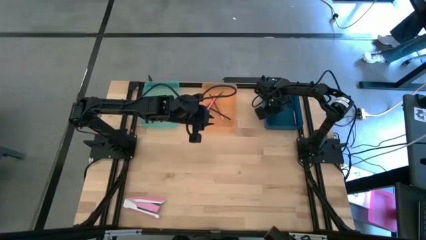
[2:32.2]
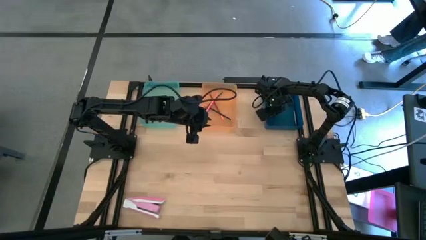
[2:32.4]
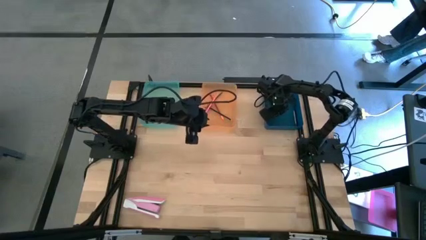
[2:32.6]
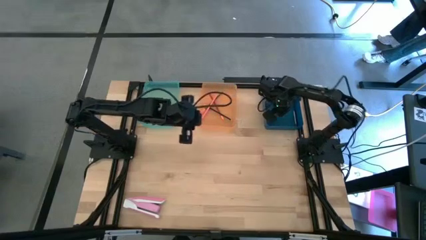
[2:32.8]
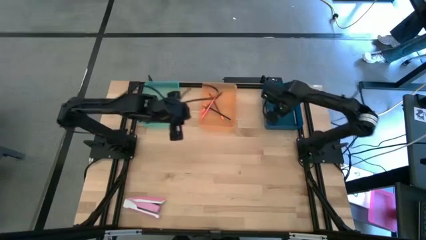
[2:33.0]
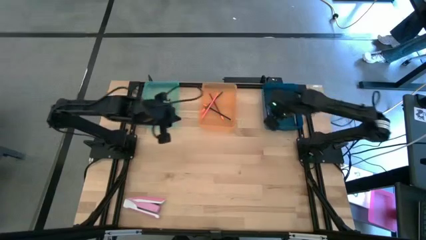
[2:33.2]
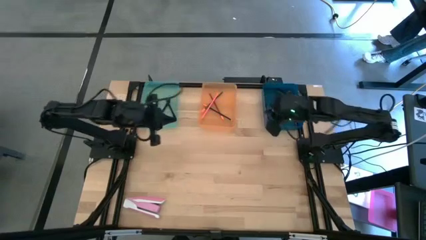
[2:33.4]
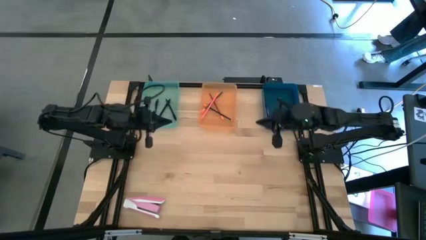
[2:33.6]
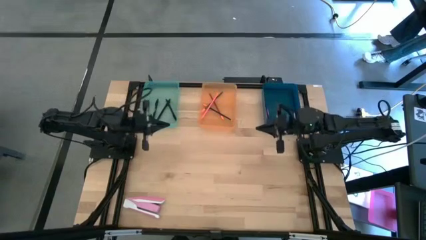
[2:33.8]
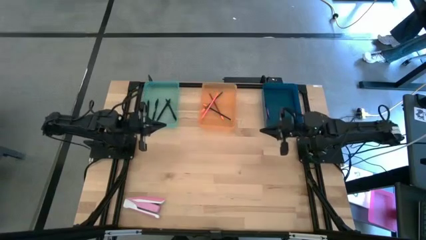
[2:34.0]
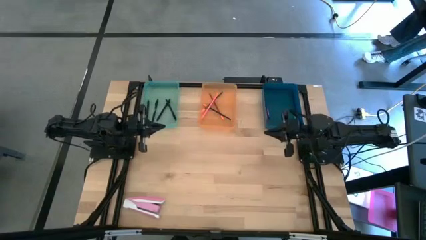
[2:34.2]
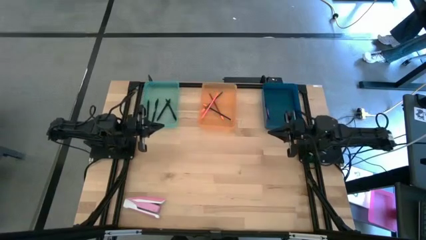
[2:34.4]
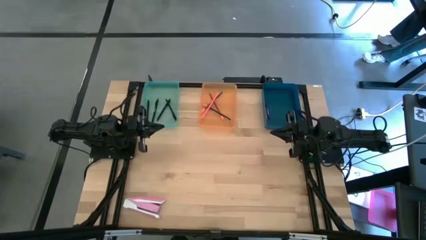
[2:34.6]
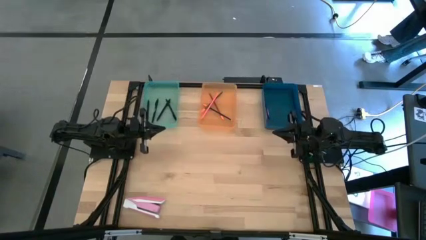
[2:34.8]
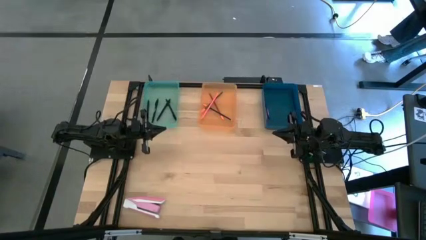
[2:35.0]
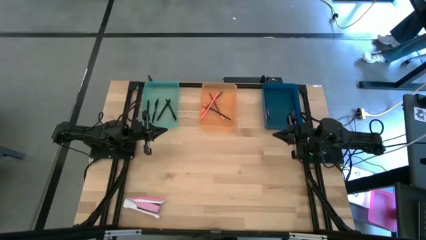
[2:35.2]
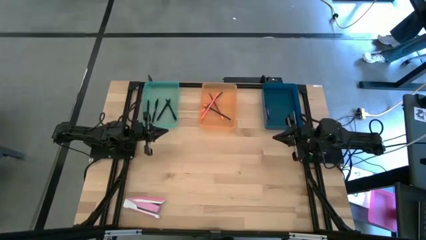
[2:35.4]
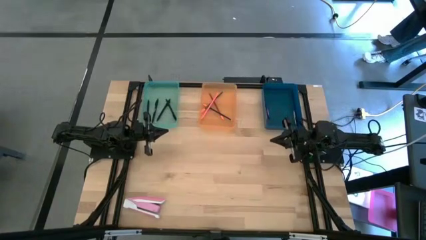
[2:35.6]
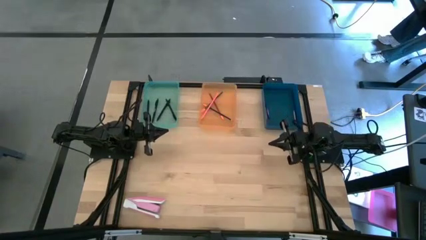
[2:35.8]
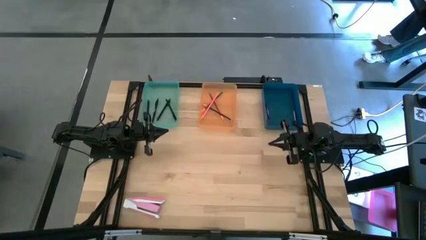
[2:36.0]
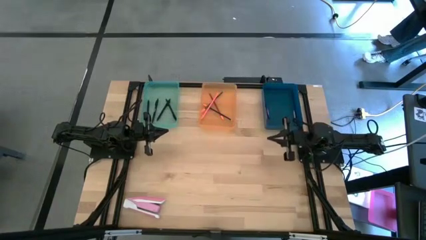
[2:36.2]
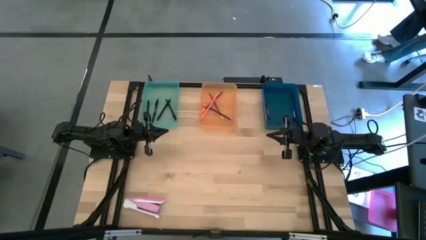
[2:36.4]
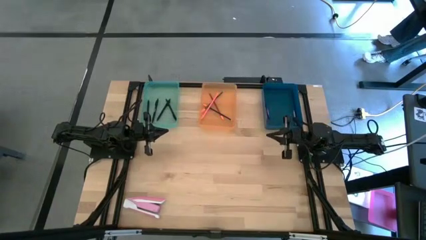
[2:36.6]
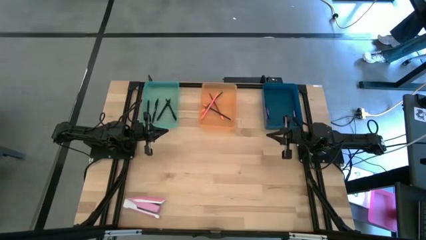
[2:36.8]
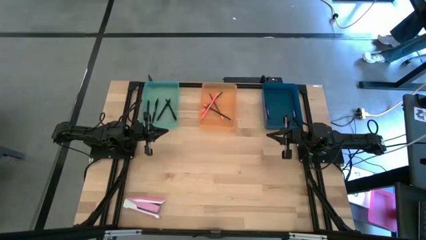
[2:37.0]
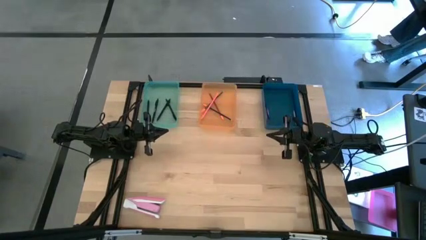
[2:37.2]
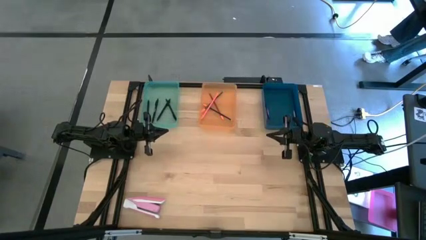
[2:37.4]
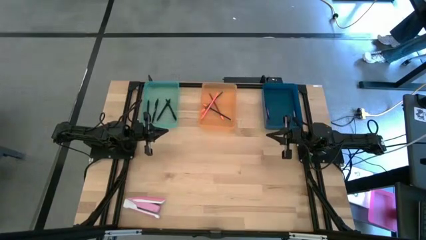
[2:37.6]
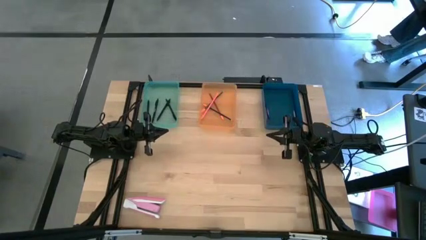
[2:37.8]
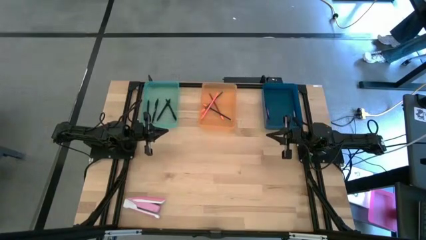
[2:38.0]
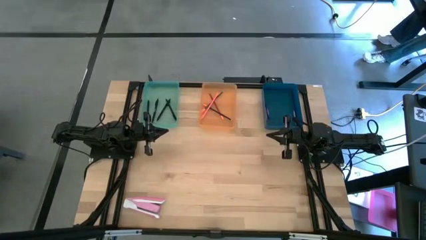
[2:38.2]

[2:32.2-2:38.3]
Task: Sort crayons/erasers/pens/pencils in bins
Return to Home Position

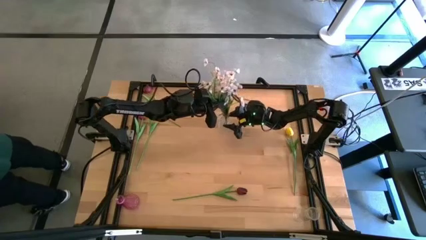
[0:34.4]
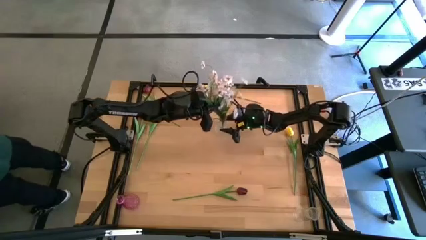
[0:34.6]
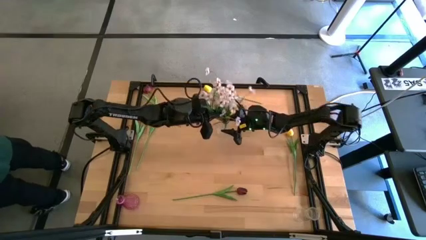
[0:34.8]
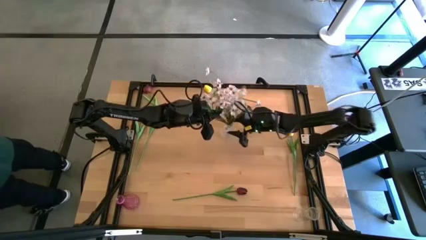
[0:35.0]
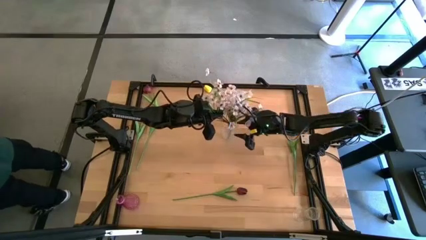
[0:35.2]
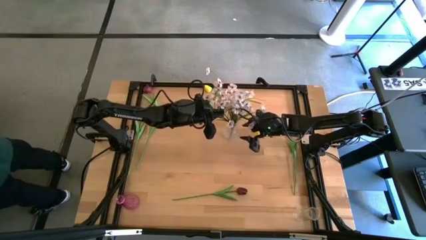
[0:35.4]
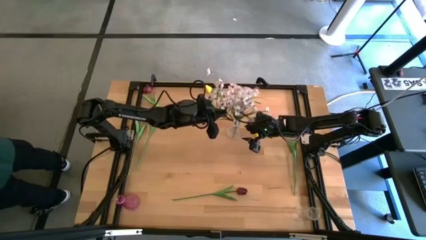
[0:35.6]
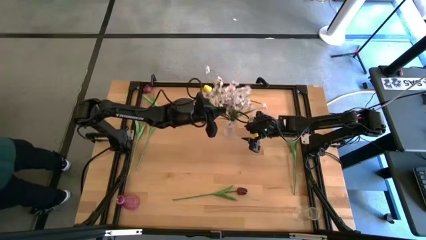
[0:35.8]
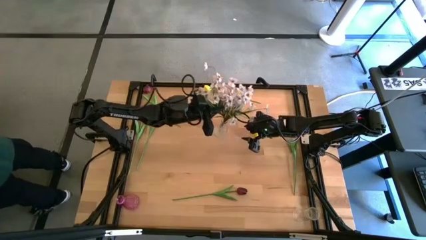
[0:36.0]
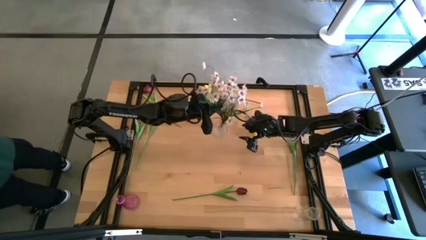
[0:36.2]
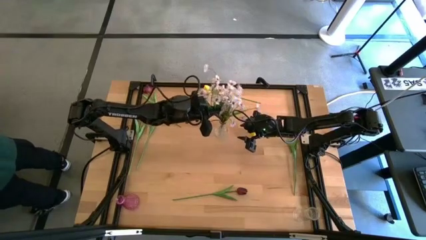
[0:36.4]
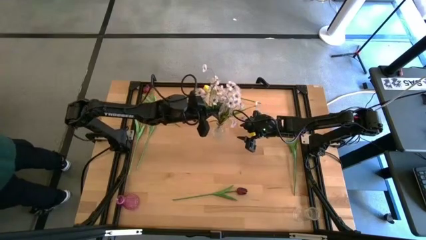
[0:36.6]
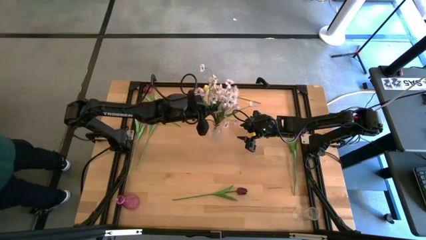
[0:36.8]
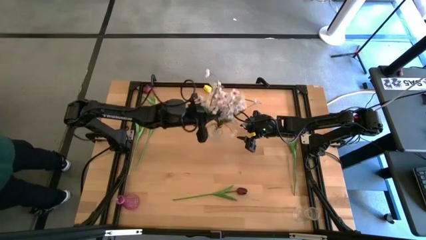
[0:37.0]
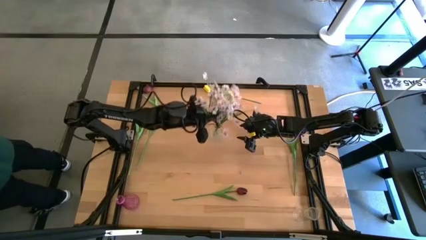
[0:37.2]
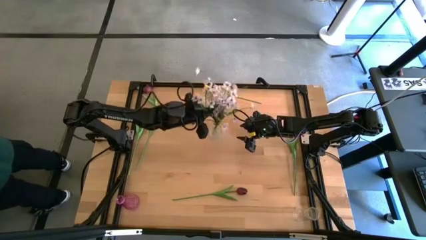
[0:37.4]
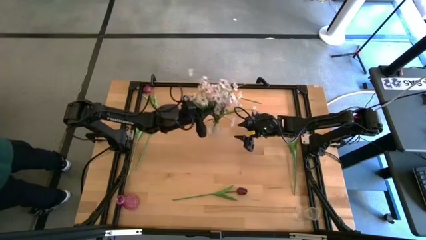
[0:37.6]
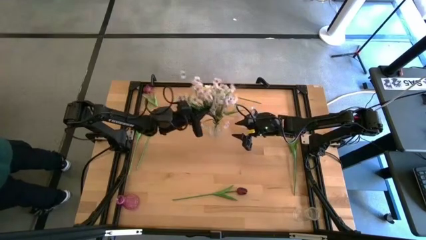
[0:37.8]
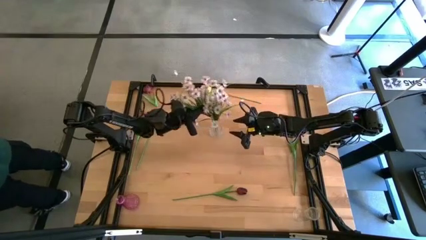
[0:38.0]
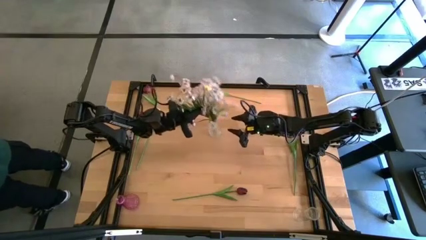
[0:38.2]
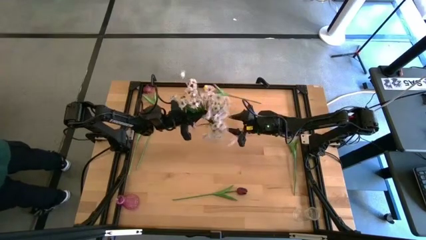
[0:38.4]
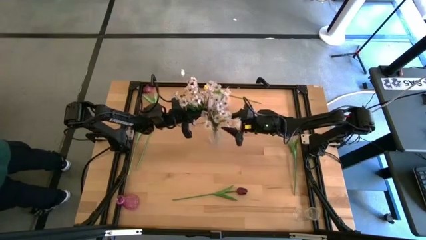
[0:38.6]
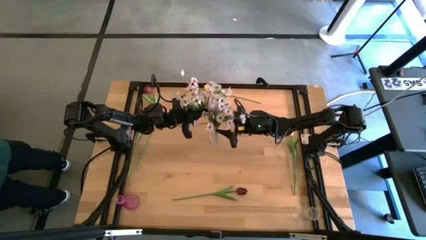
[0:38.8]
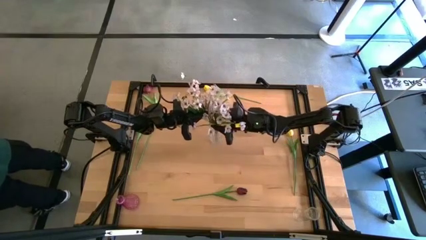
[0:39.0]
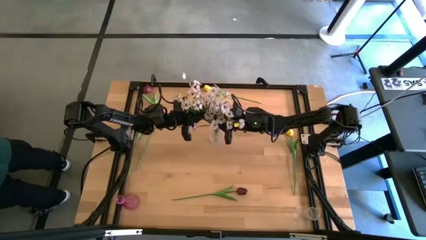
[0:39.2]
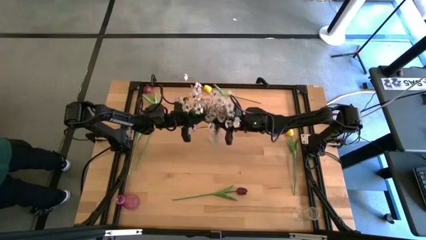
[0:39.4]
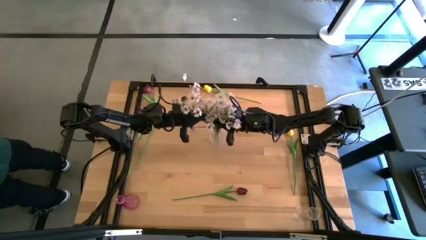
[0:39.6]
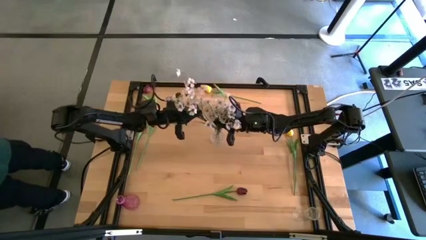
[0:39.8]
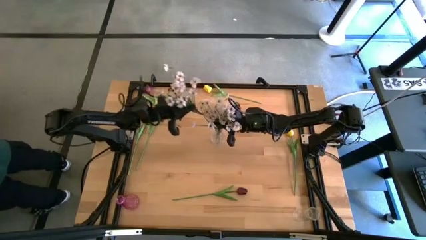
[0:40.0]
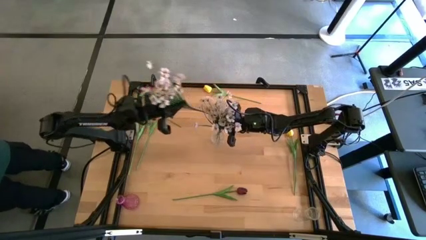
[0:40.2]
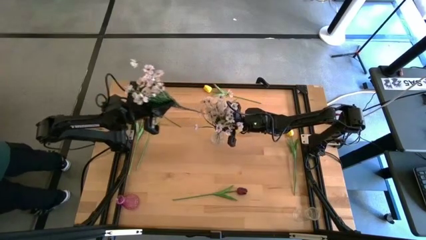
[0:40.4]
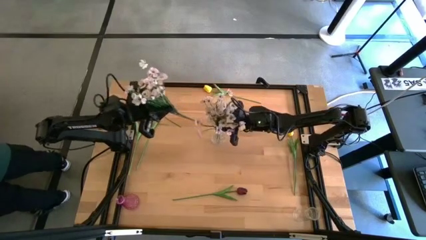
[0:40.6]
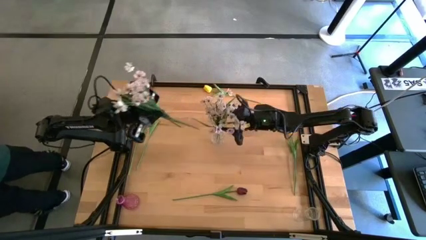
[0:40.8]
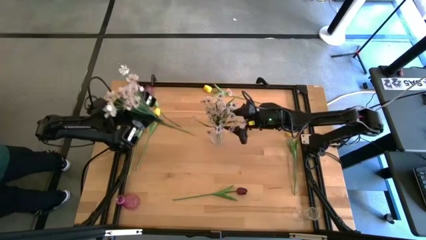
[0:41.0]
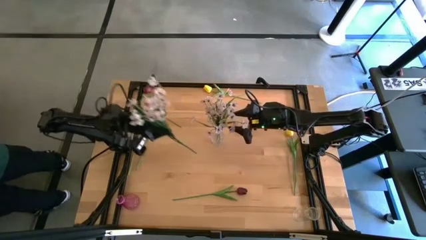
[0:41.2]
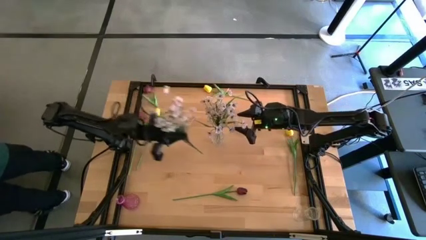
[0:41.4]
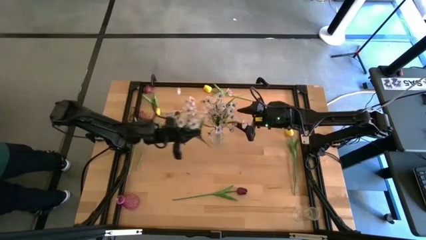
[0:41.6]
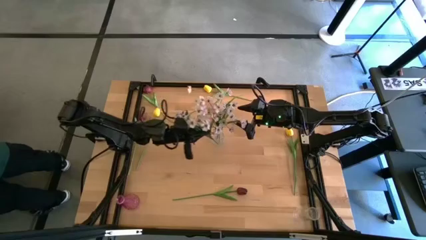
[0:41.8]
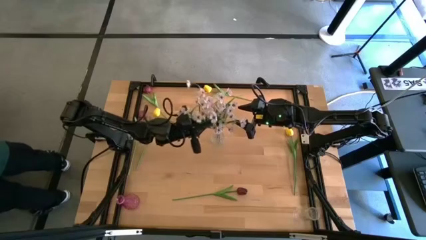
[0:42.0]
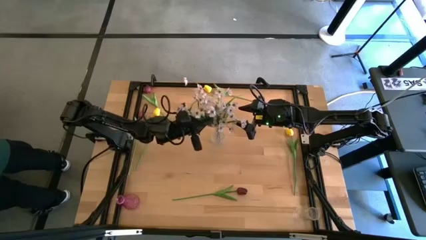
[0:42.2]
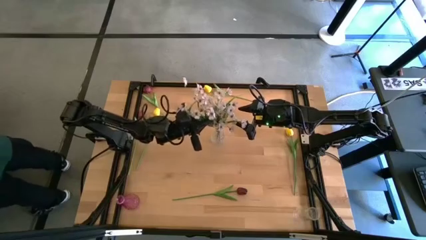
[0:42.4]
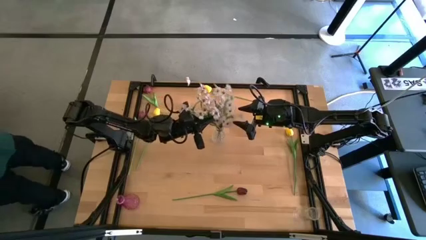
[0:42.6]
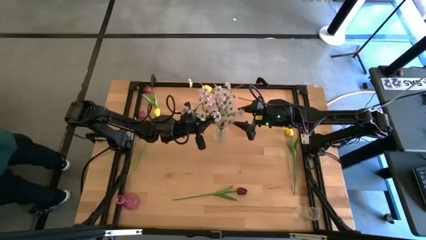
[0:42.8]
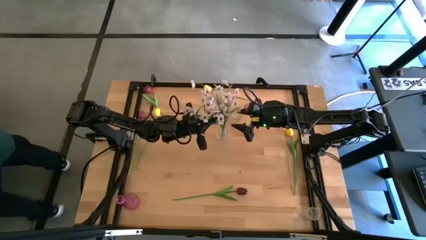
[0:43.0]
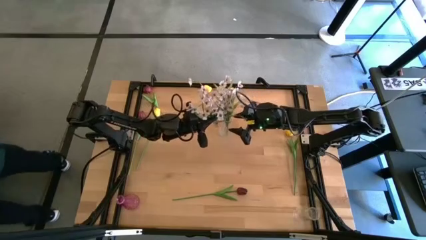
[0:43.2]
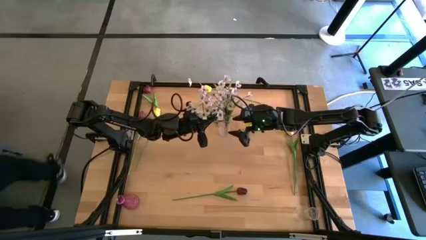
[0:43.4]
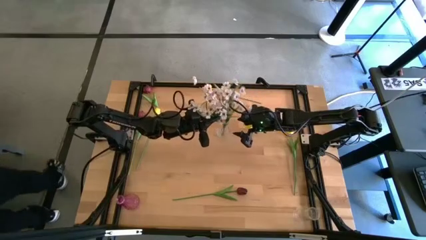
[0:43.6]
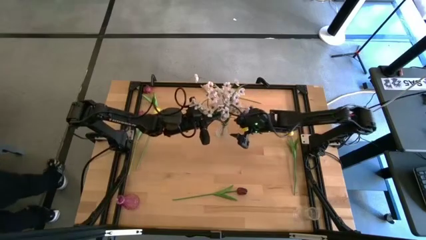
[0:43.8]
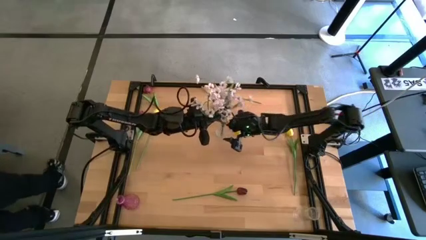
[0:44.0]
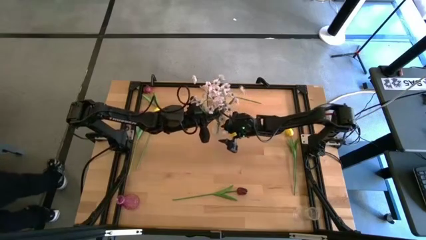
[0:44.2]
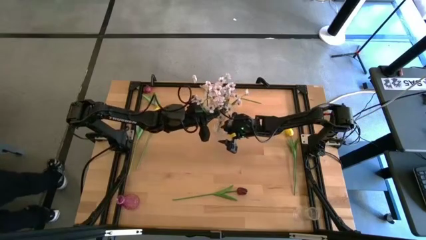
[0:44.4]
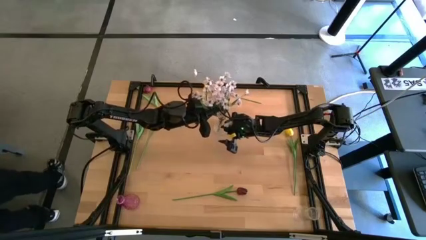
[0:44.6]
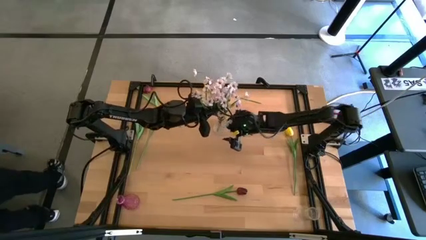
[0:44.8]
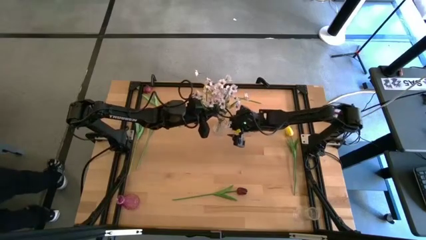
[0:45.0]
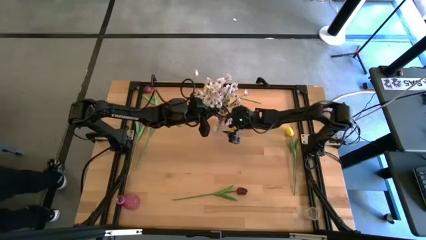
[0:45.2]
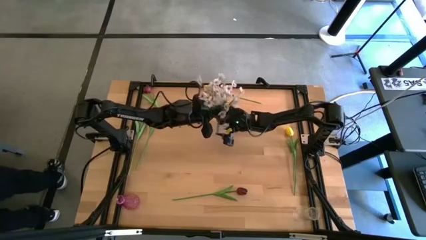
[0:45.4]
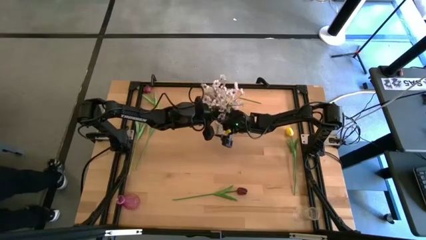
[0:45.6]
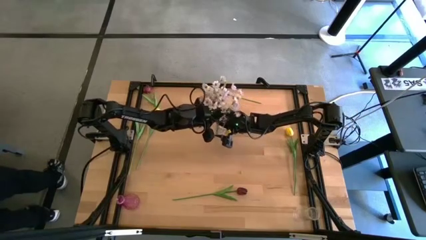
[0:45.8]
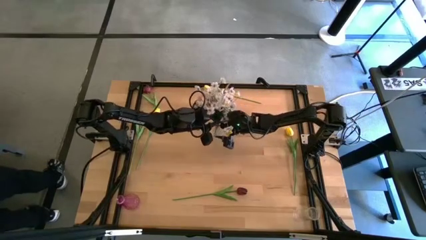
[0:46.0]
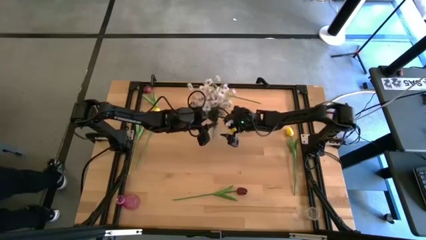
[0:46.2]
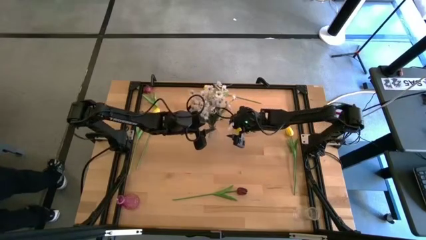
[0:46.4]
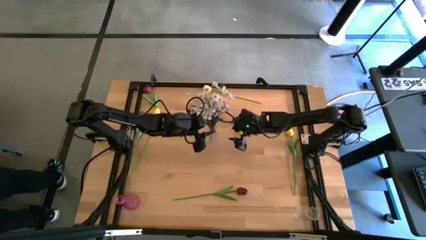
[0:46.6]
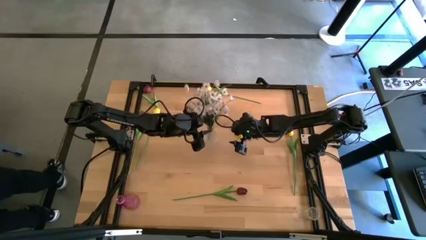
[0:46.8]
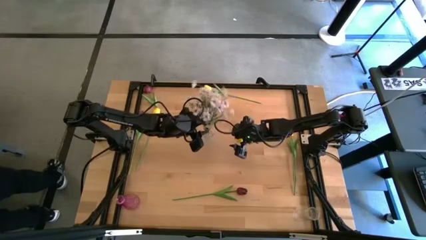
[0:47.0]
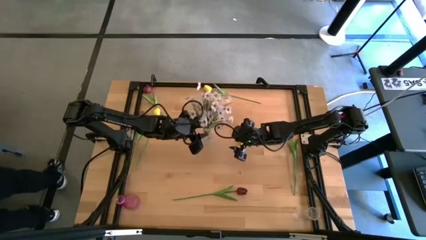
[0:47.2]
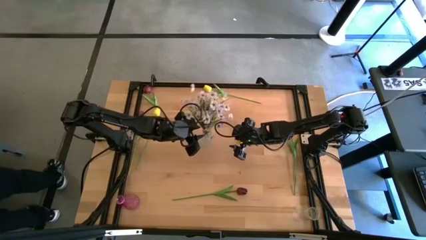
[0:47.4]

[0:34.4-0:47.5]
Task: Sort flowers into vase by color
Put the white flowers into the top transparent vase
